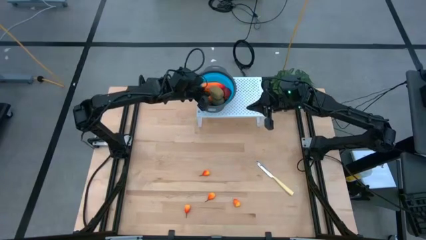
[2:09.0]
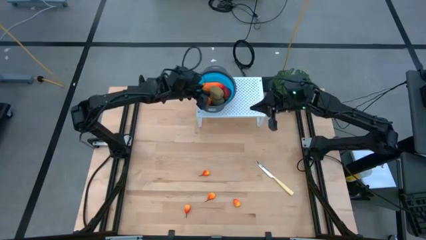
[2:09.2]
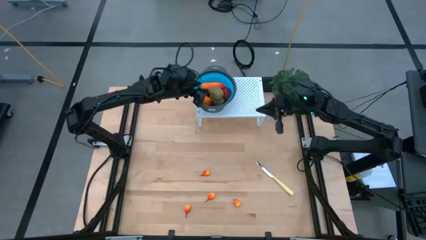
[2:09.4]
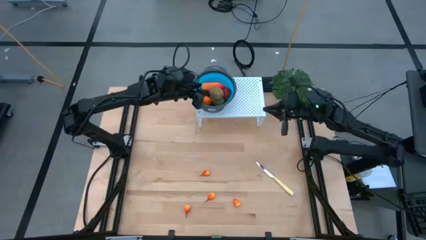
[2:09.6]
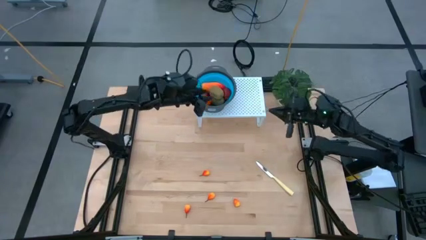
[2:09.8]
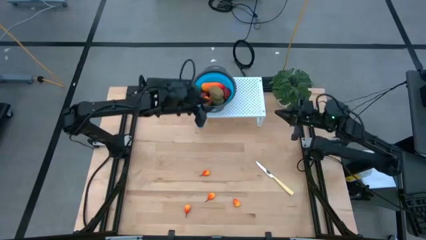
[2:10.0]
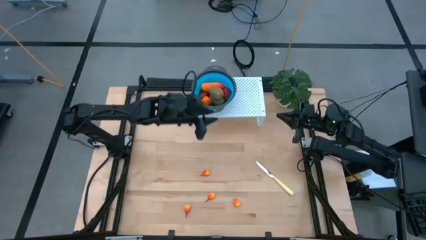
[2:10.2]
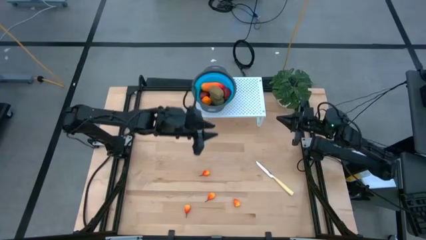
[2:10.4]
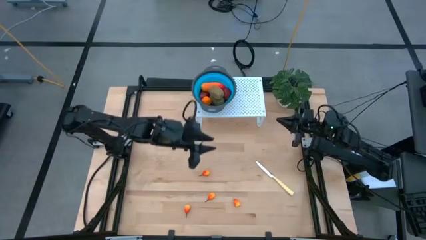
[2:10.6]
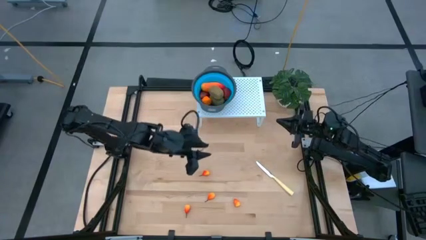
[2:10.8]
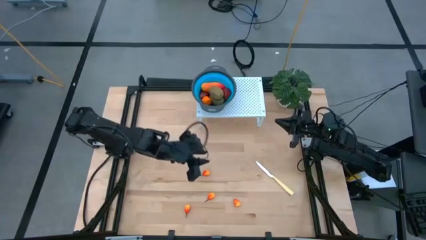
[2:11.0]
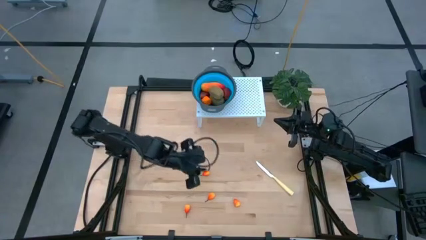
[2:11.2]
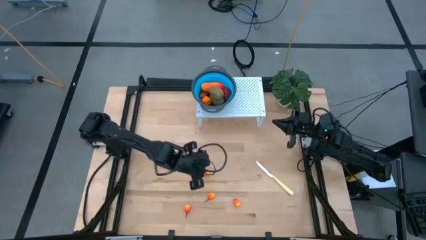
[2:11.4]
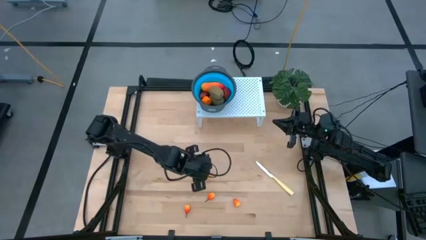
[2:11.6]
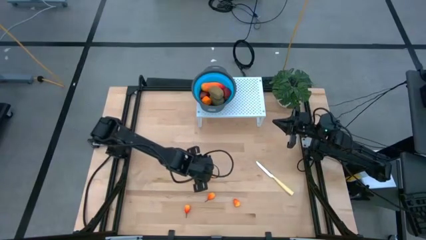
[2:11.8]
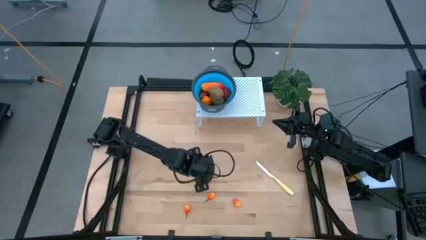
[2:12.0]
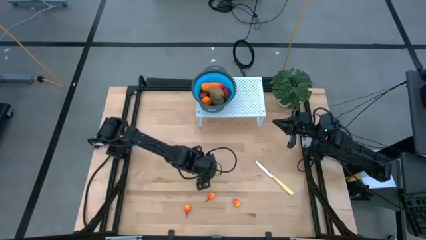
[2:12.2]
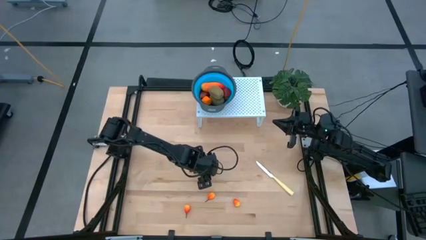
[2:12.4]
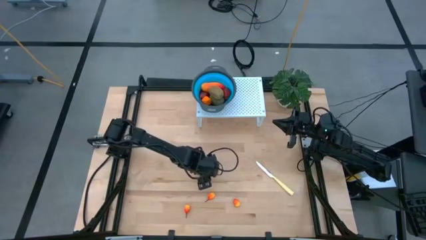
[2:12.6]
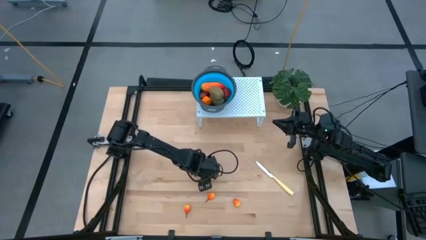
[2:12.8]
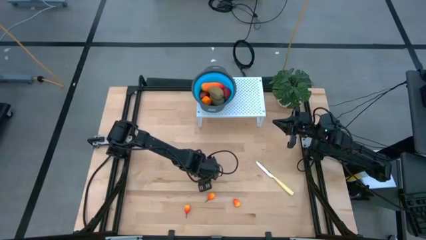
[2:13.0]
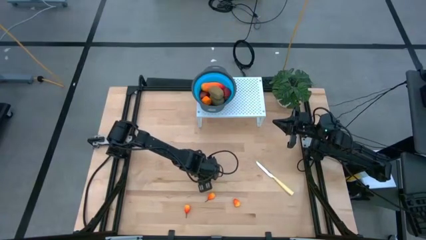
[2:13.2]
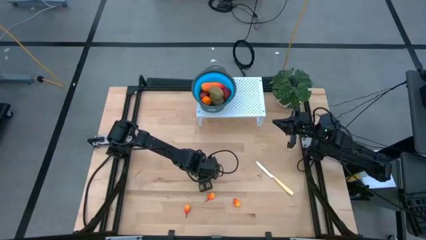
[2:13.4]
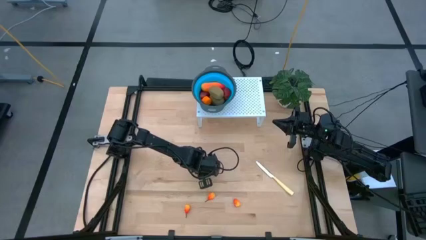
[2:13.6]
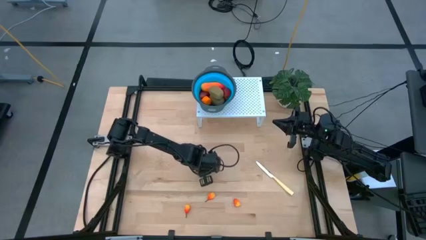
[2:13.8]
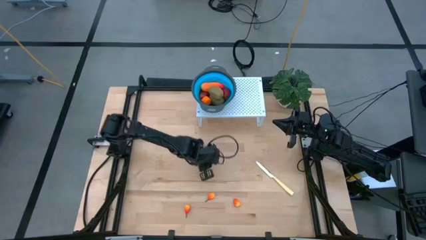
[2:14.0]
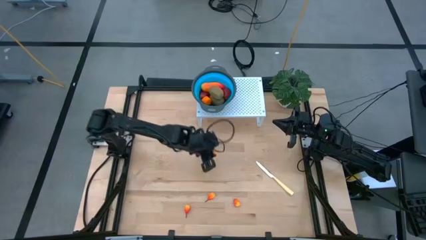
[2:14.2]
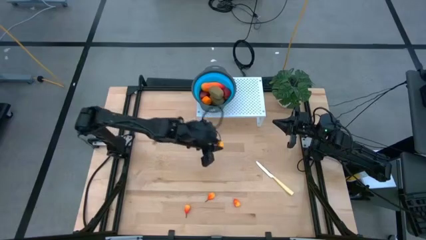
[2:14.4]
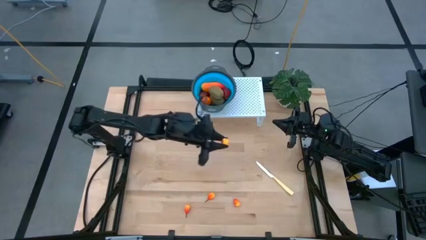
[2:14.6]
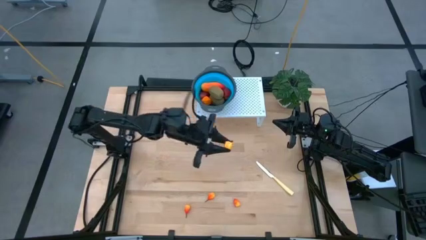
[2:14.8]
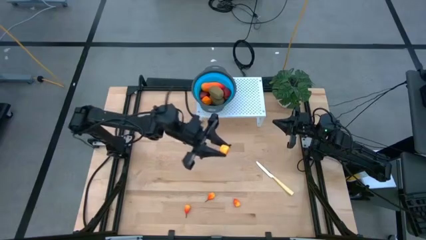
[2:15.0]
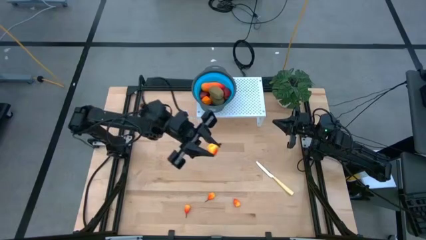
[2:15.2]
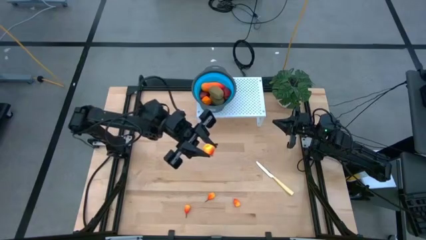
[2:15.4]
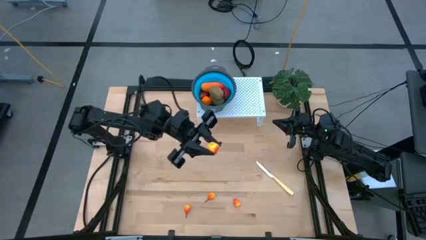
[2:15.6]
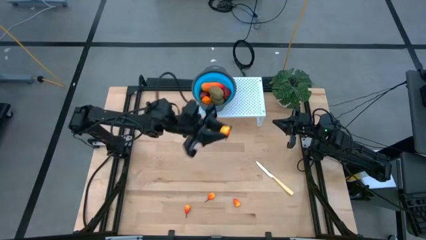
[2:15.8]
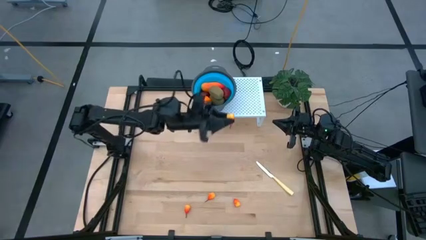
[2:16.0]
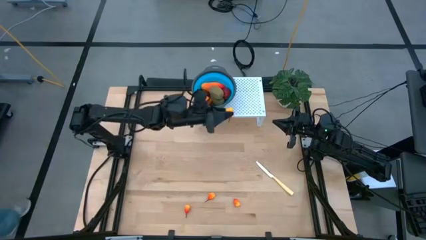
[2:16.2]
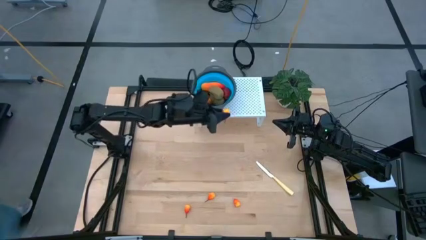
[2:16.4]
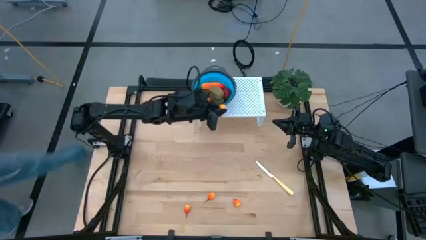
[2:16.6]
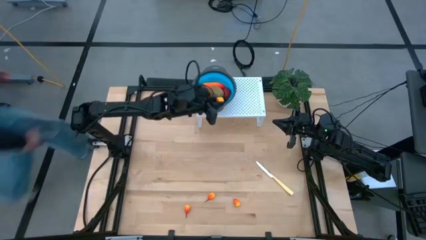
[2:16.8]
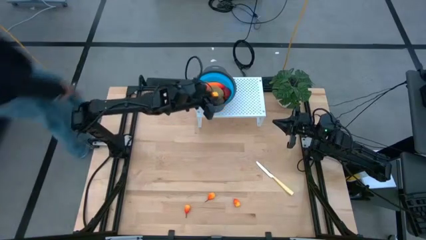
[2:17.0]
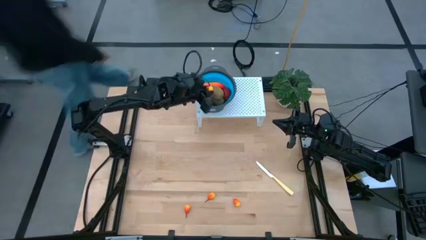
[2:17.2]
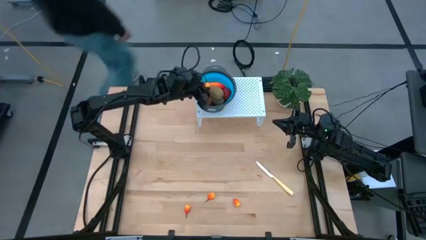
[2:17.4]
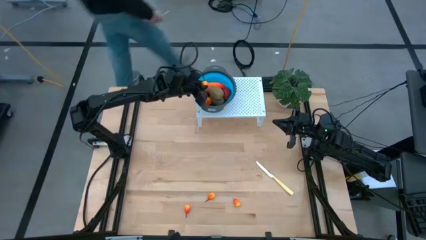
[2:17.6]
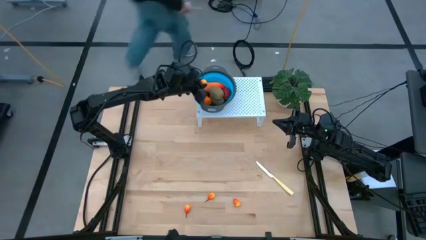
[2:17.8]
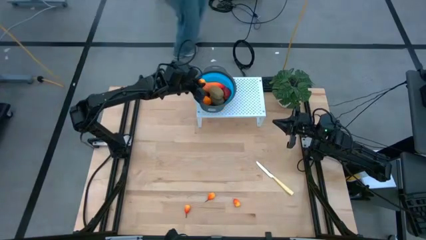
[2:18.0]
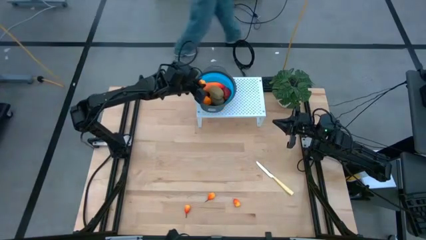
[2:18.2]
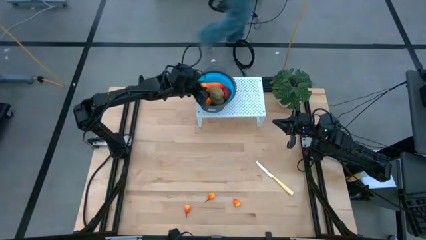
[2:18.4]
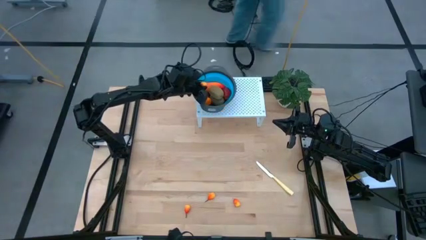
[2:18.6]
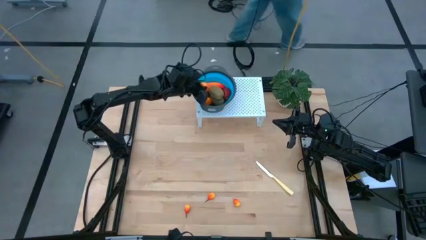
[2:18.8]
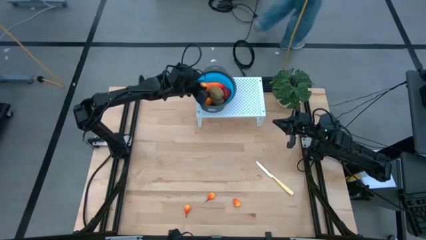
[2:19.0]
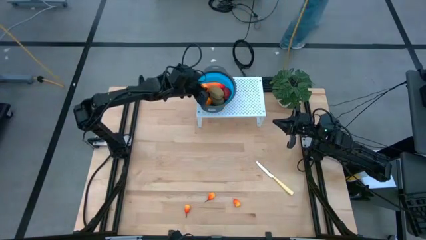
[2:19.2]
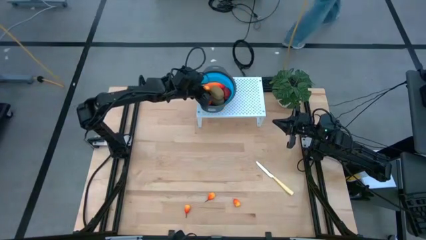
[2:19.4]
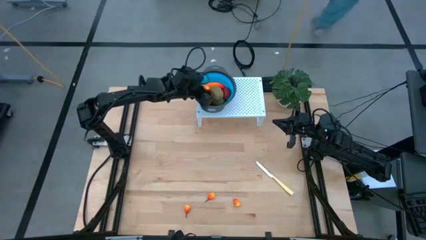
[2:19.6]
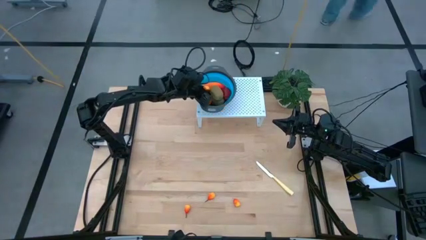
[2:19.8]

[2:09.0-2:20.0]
Task: Pick & Place Fruit
Put the peach into the blue strainer bowl on the shelf

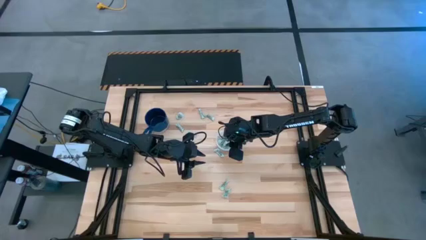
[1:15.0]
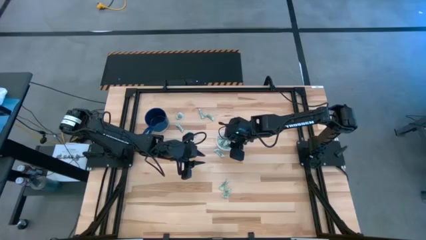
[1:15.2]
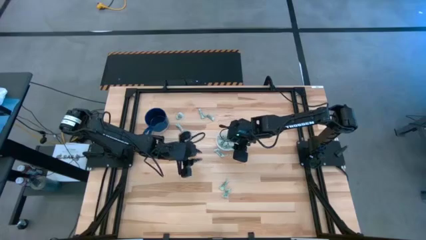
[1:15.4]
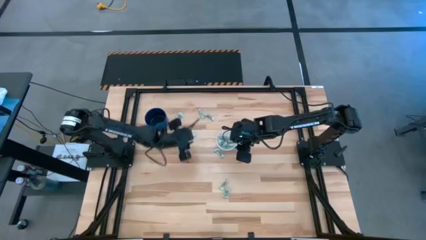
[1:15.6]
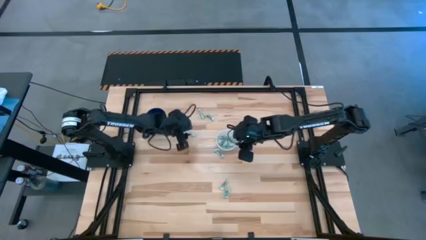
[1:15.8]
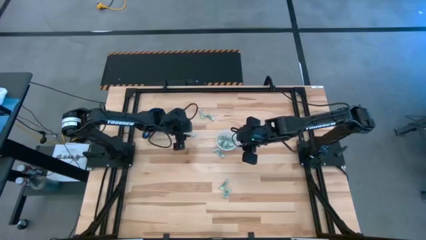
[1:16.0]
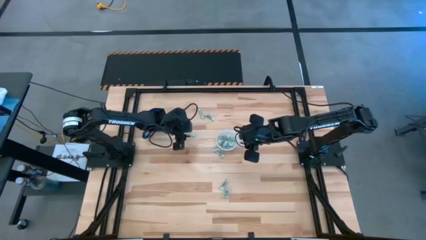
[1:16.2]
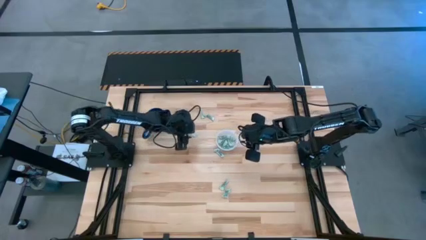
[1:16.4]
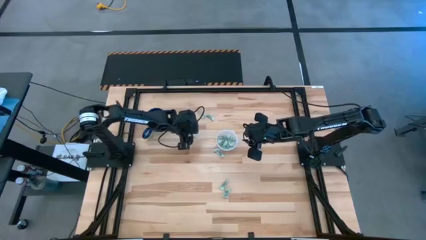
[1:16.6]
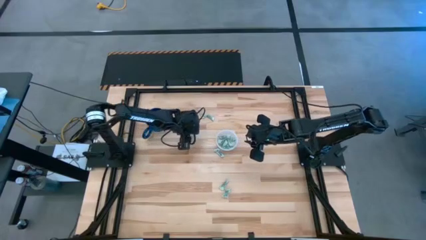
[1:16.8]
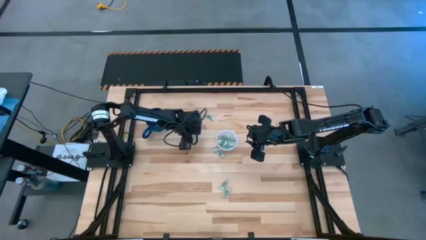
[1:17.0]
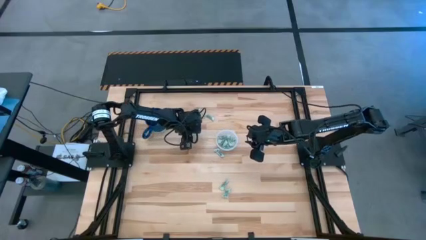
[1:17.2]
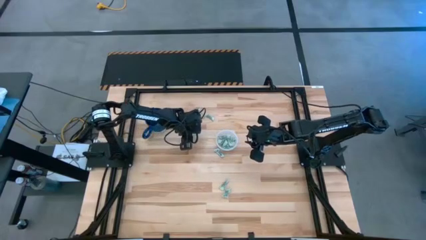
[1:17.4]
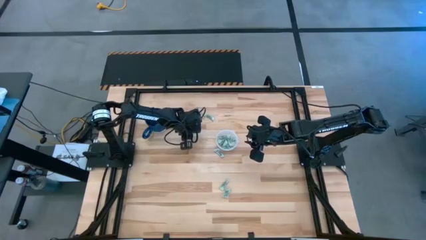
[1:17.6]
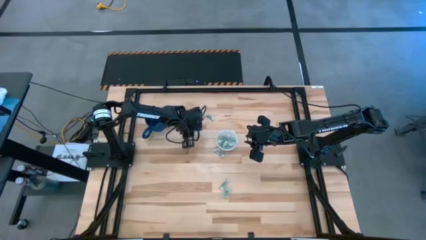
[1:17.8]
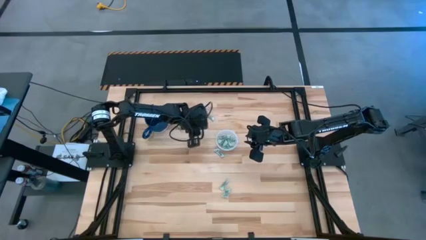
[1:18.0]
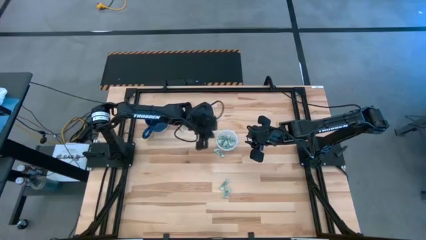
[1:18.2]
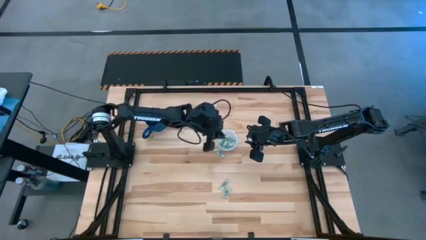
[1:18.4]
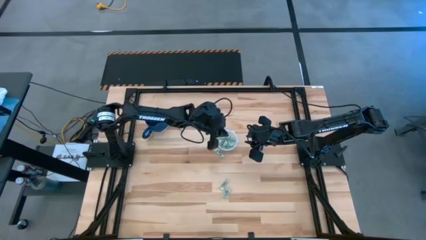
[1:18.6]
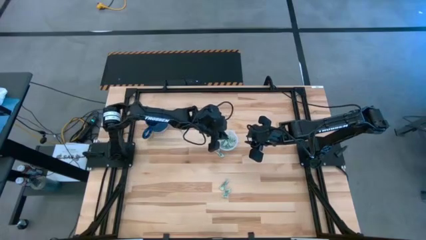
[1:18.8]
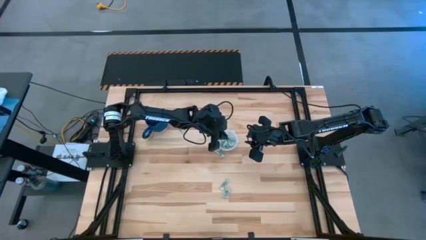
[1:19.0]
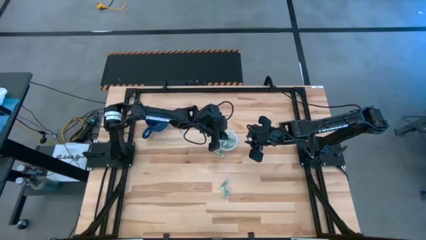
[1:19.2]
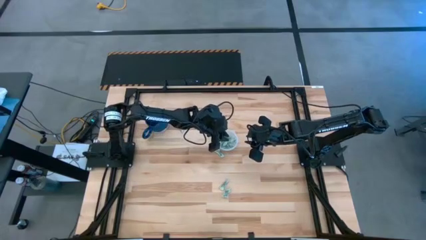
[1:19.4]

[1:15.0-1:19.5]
Task: Pick and place items into bin
Put the gray stevia packet into the transparent bin
